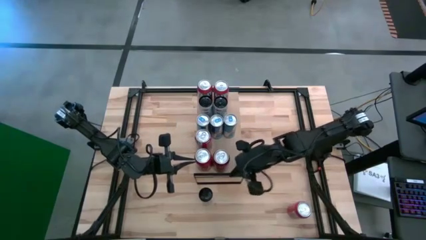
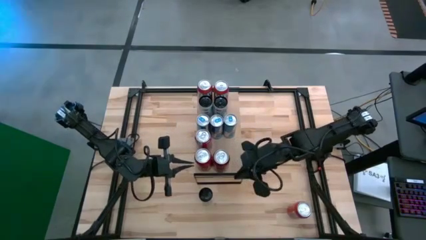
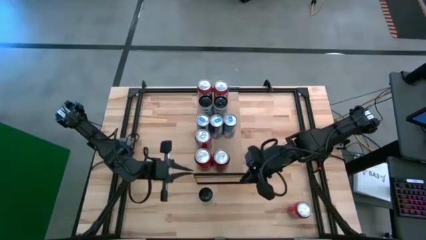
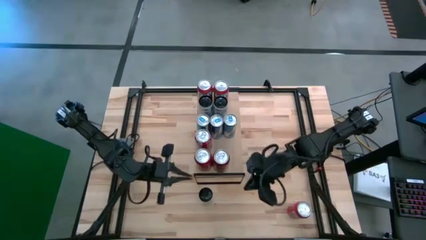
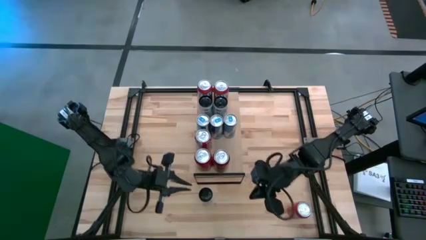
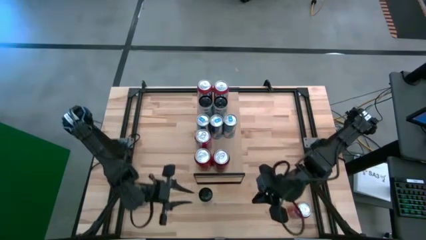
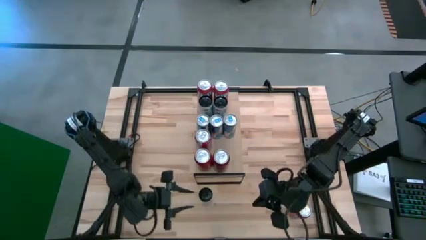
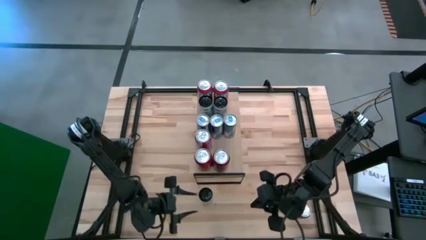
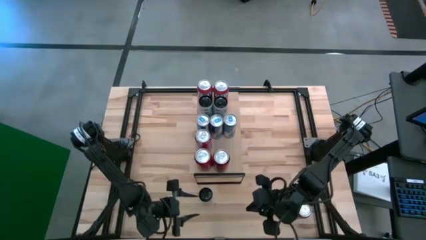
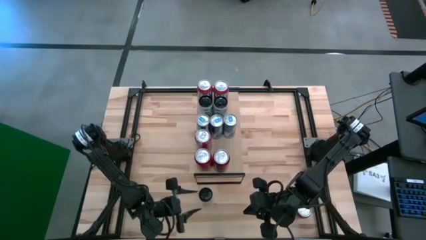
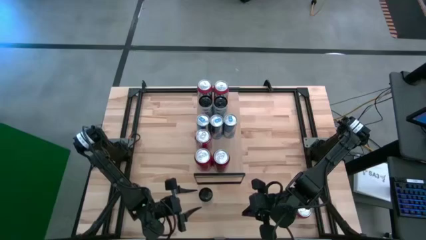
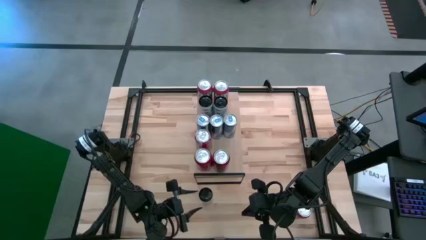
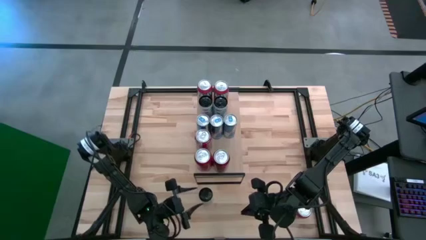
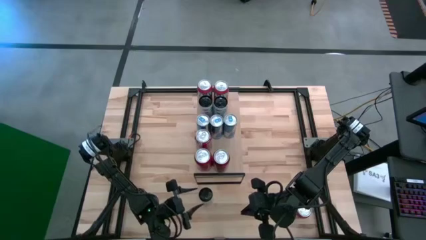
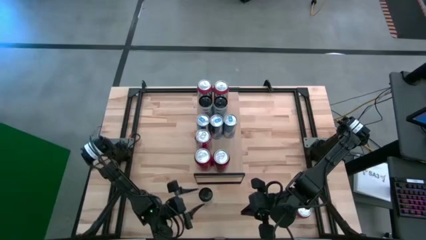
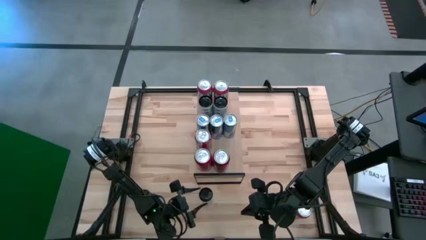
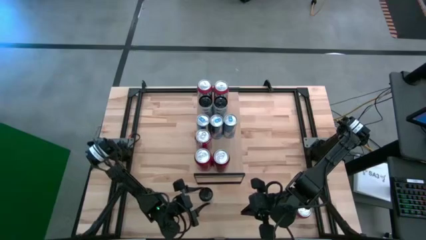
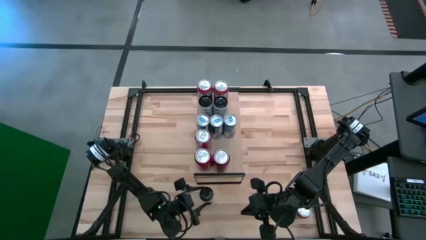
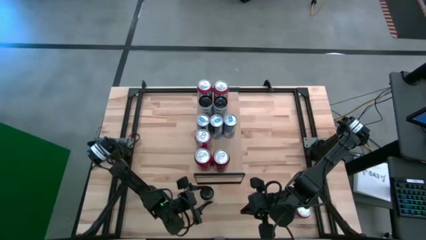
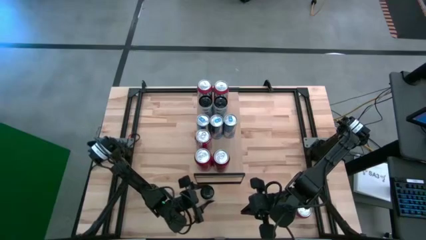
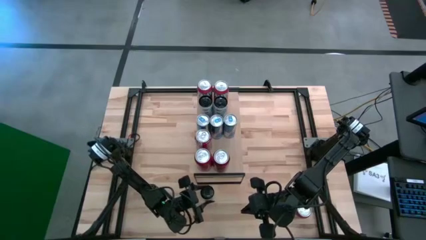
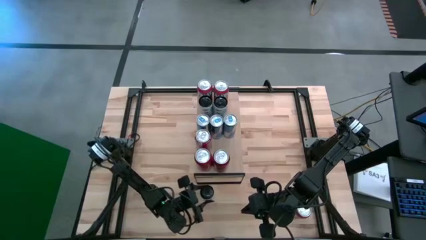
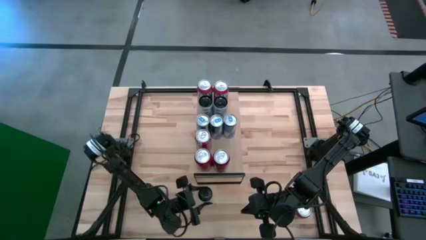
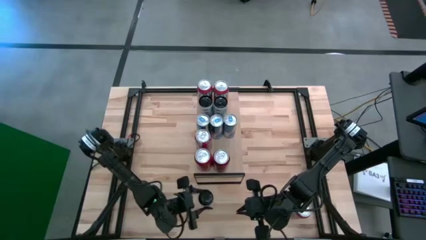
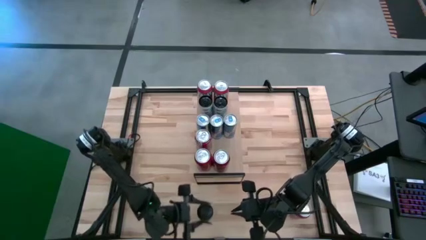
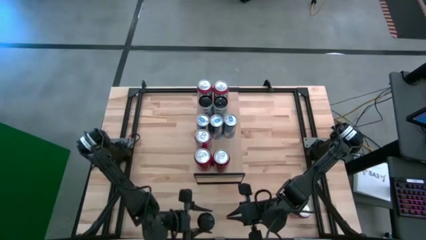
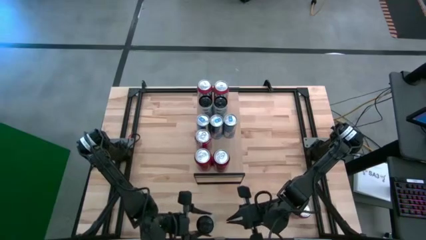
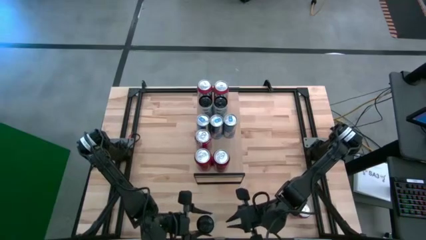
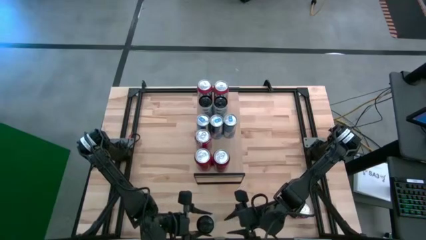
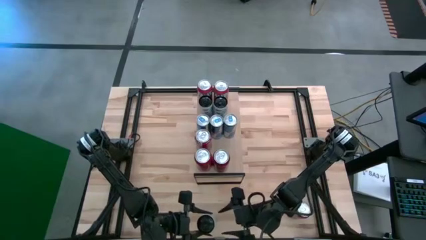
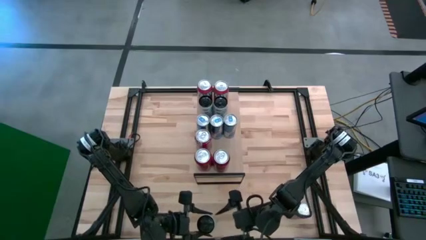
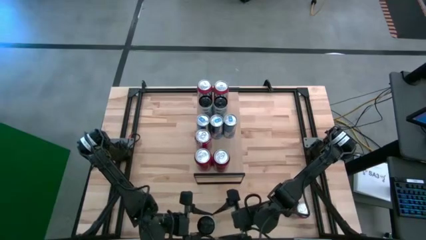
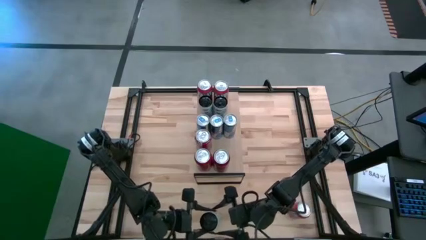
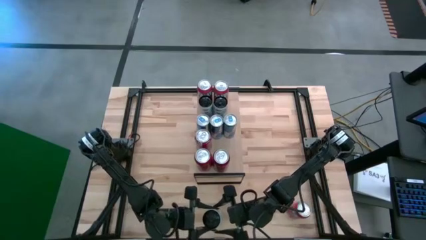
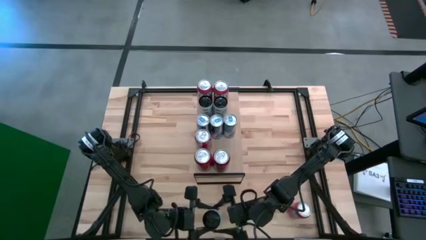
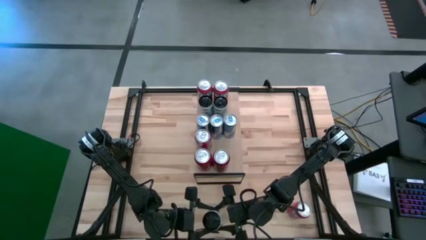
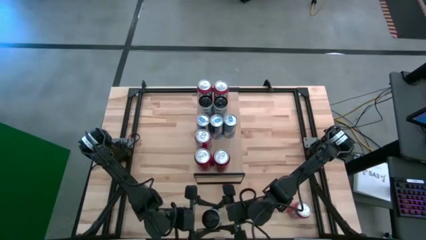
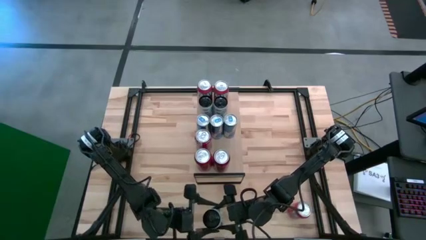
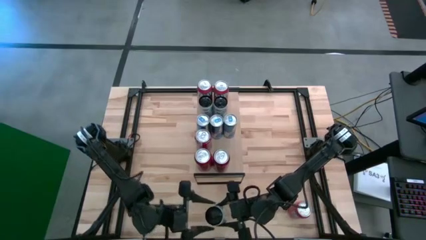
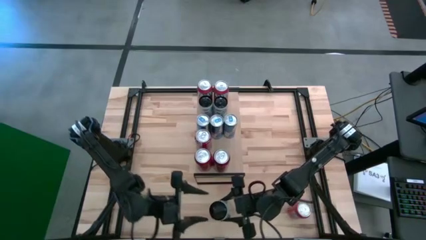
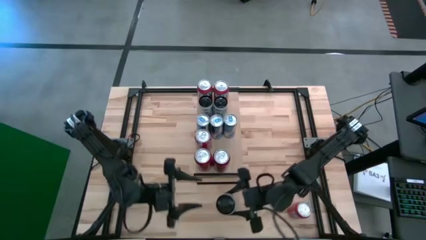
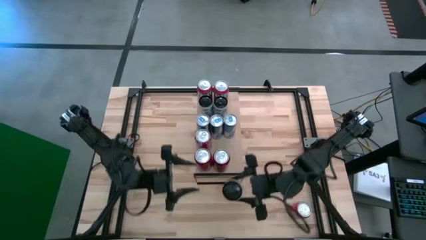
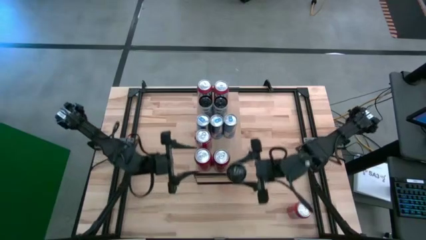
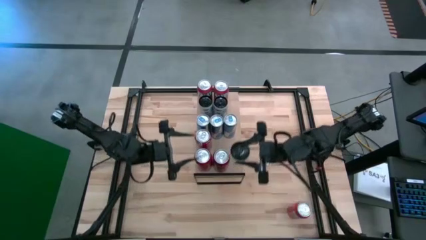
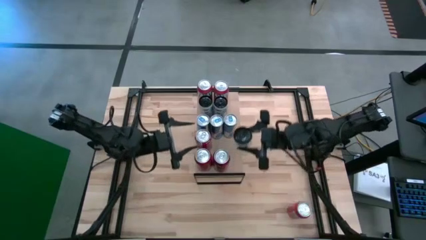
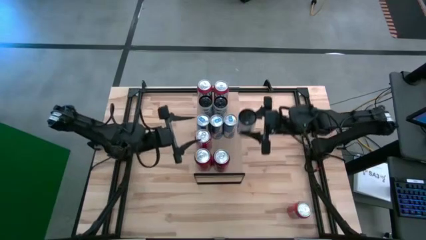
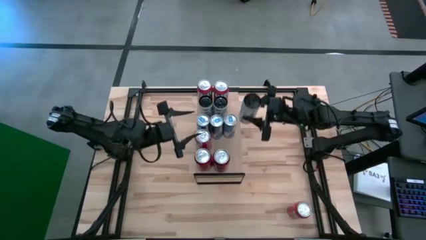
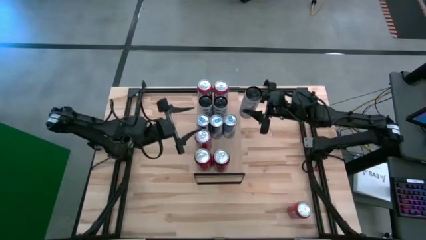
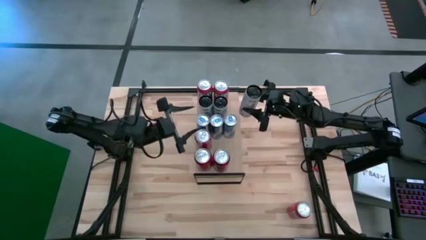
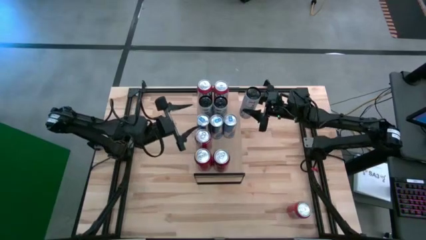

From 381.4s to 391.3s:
Task: Place canned beverage on shelf
Put the white pink soda can on the shelf aligned with the other white pink soda cans

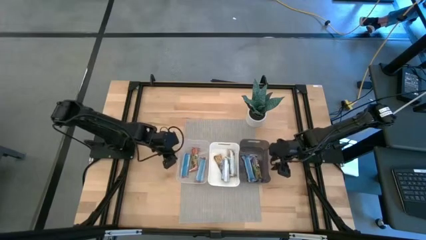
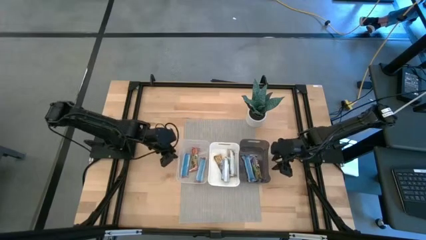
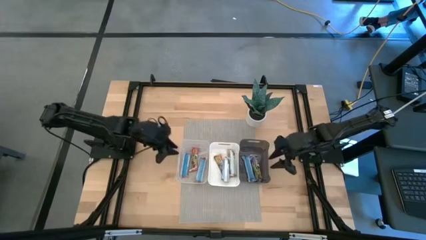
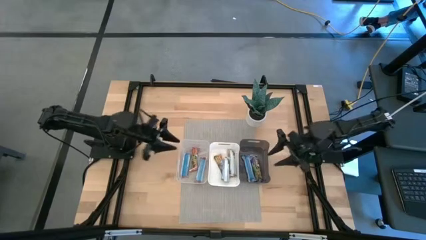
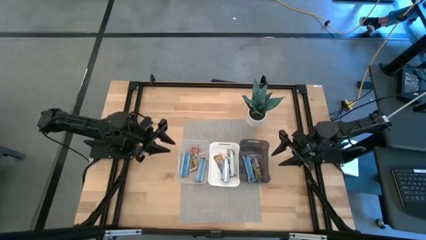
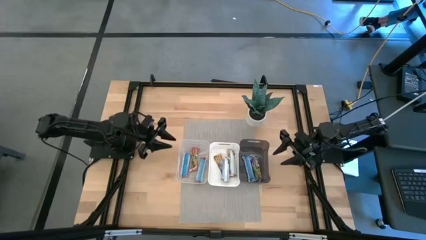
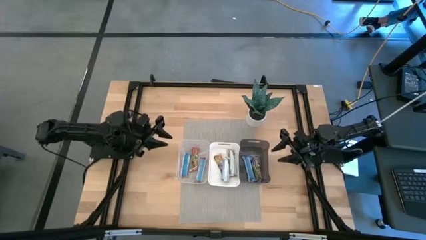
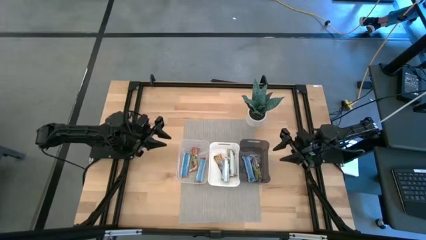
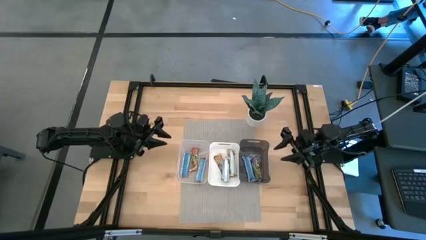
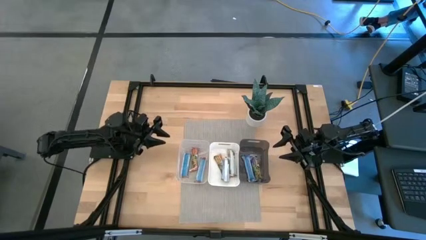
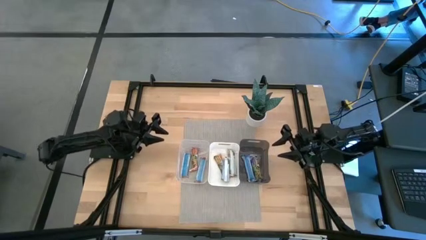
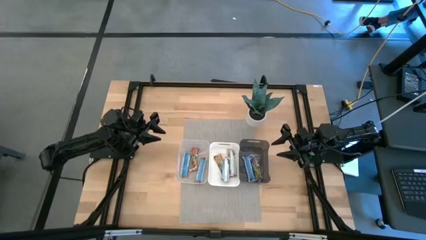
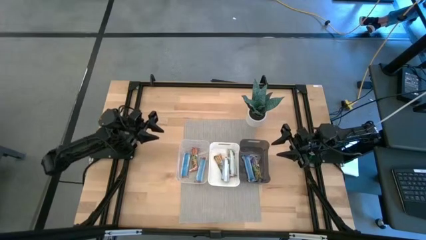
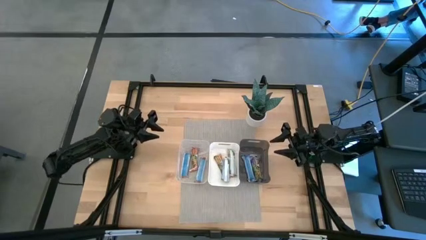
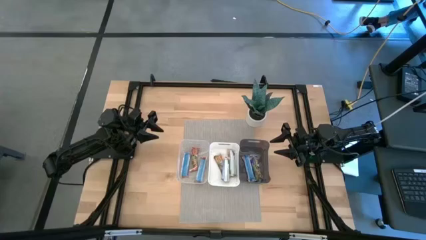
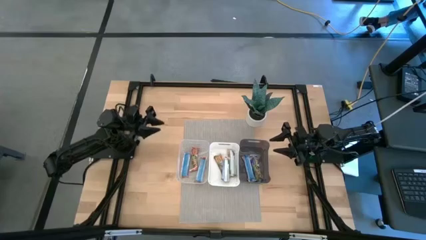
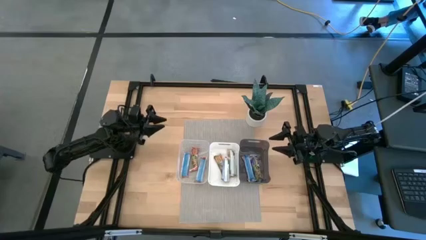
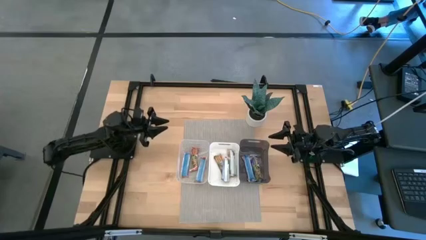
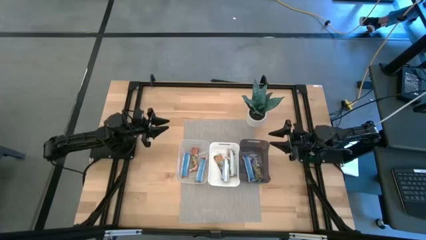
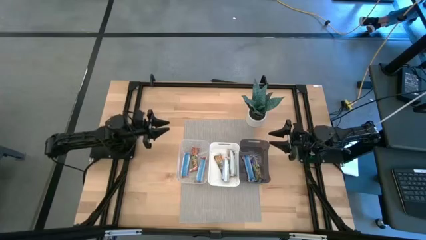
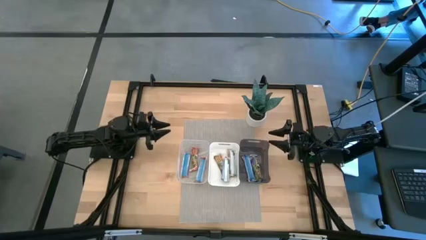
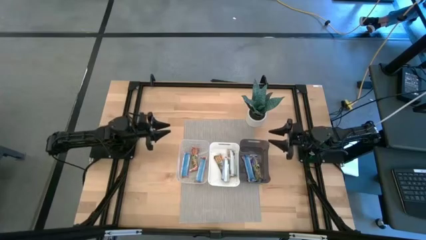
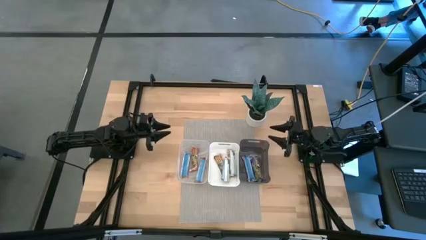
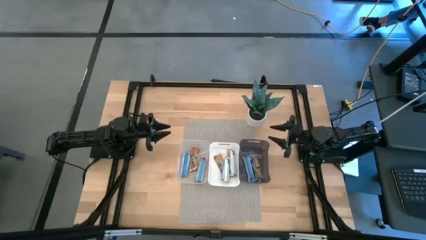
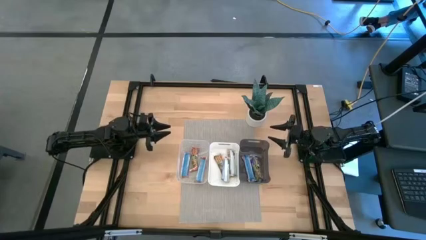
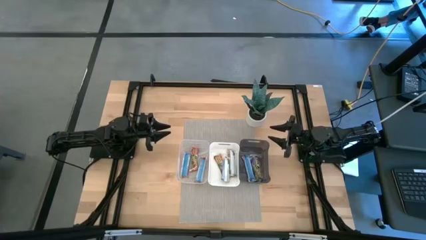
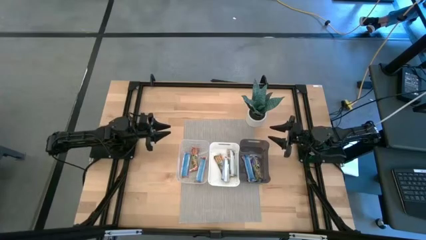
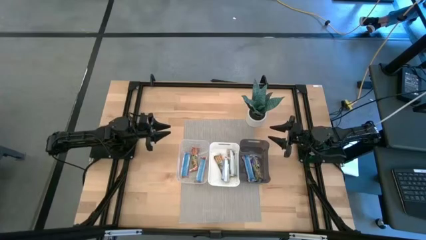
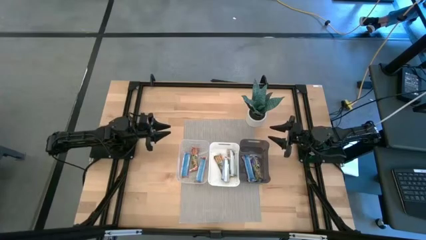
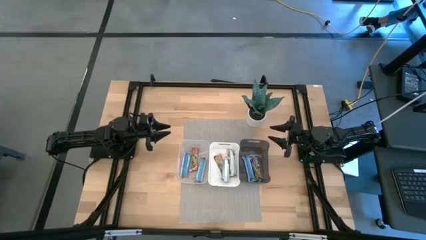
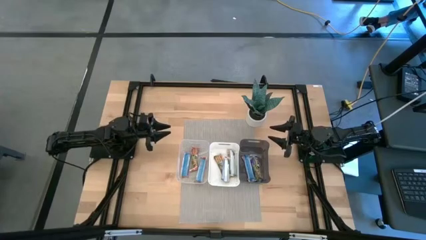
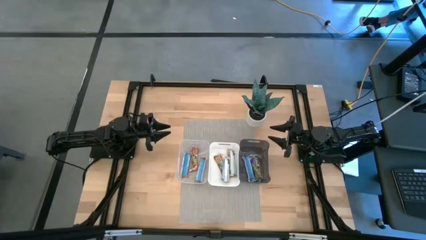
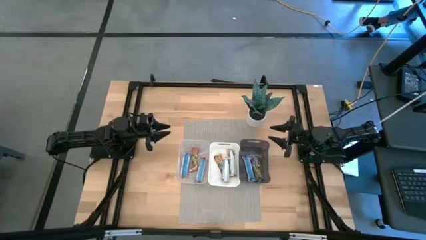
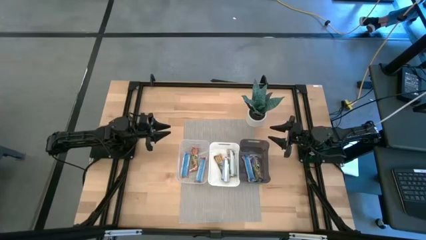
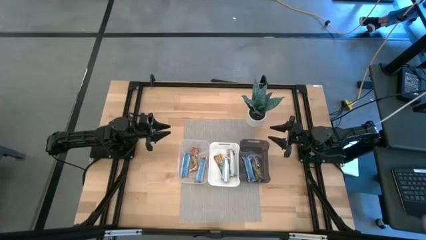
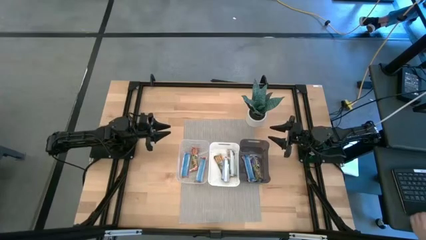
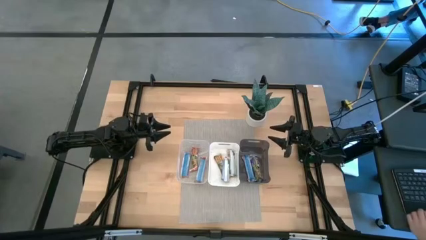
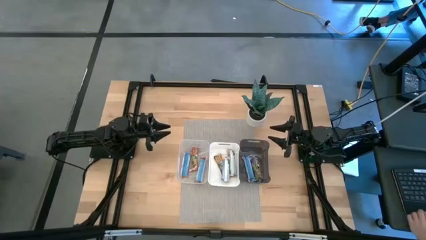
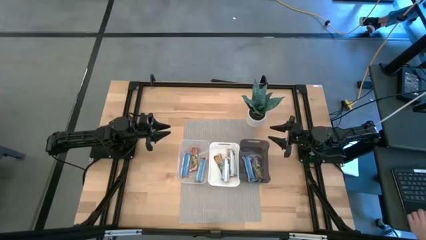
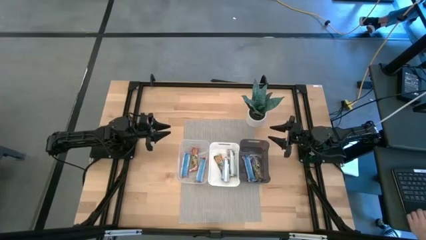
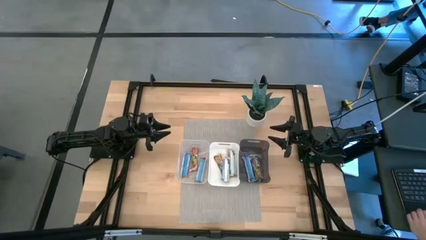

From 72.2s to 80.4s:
Task: Pick and place Granola Bars by type
Return to Home Position
